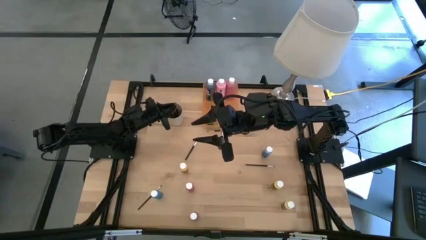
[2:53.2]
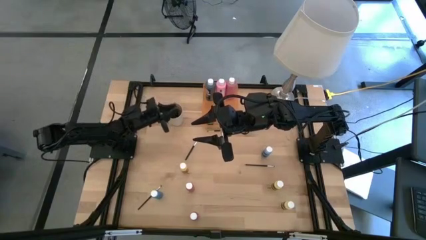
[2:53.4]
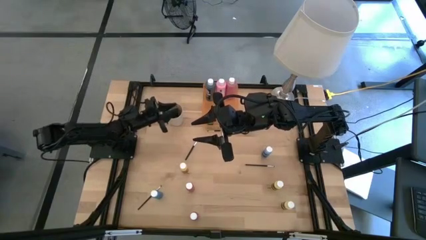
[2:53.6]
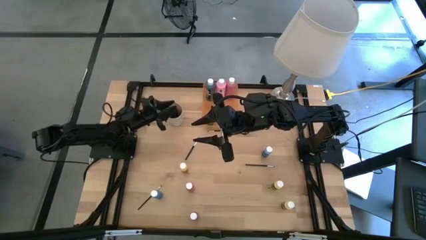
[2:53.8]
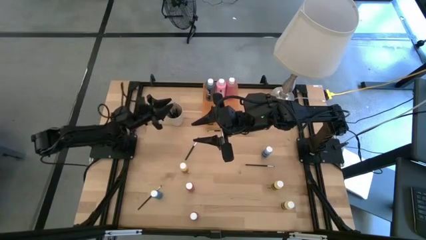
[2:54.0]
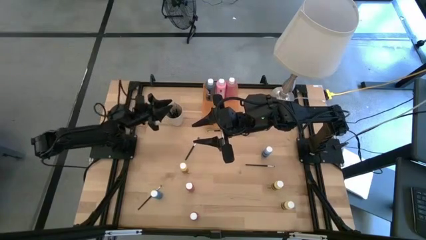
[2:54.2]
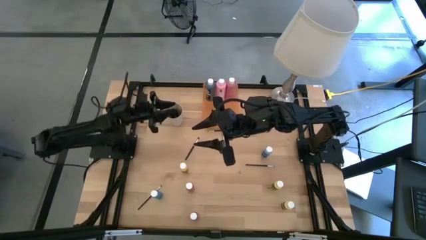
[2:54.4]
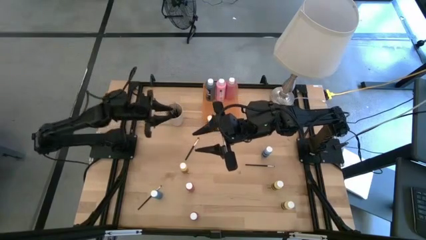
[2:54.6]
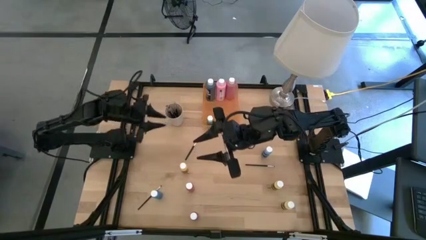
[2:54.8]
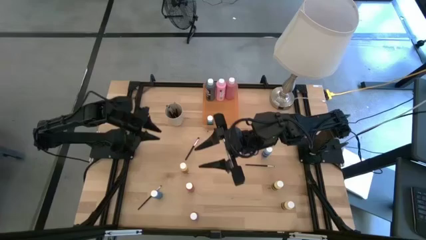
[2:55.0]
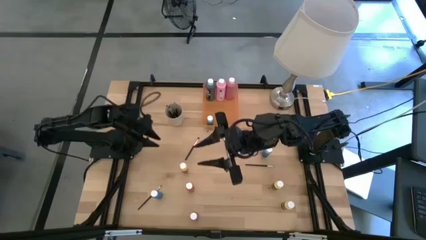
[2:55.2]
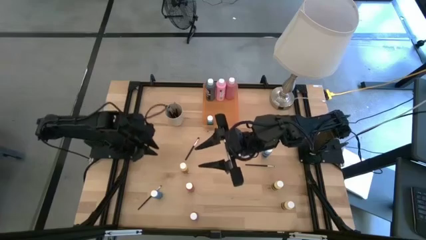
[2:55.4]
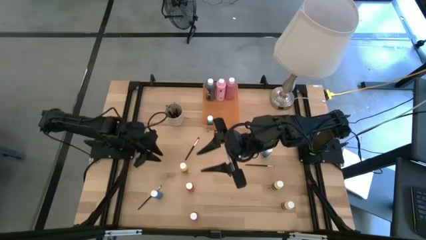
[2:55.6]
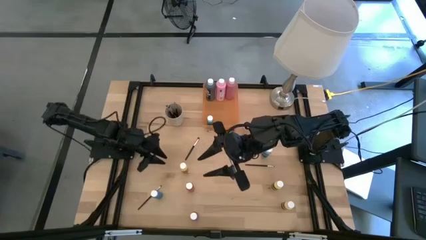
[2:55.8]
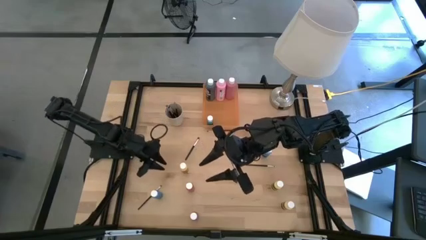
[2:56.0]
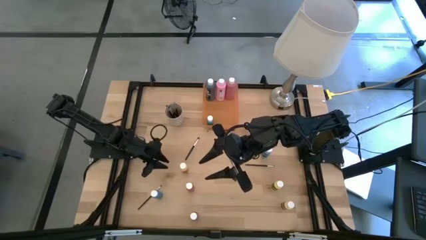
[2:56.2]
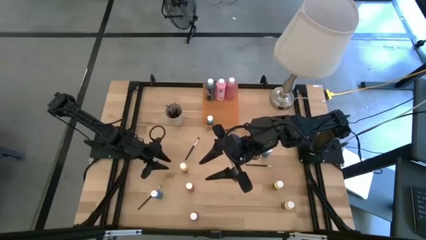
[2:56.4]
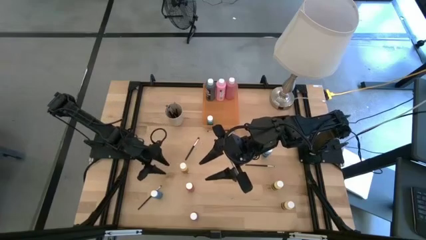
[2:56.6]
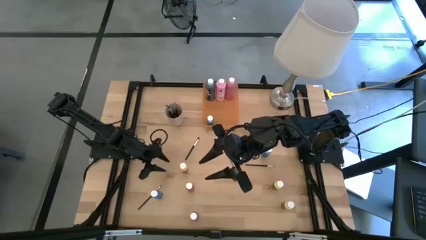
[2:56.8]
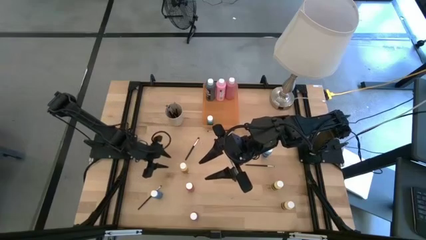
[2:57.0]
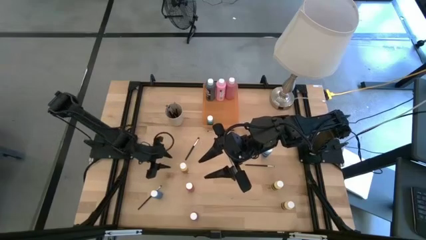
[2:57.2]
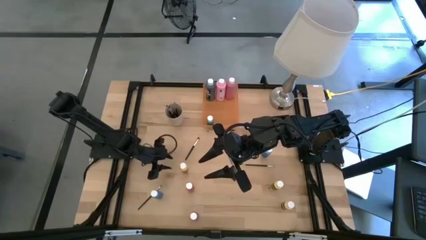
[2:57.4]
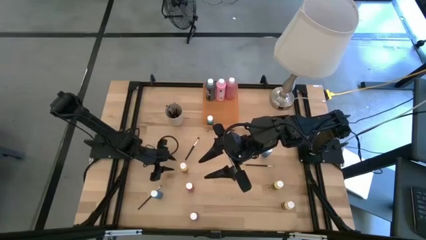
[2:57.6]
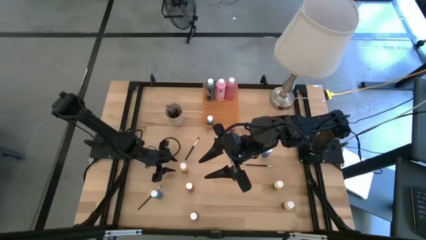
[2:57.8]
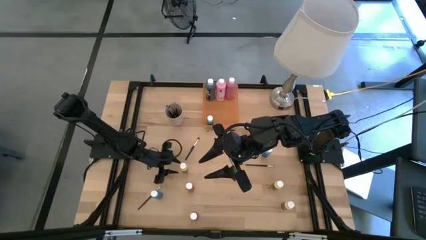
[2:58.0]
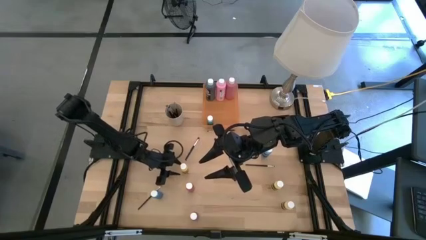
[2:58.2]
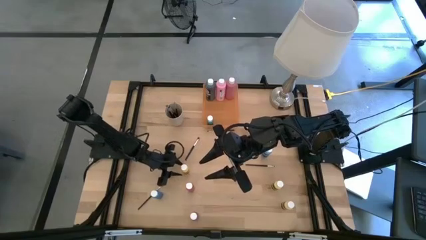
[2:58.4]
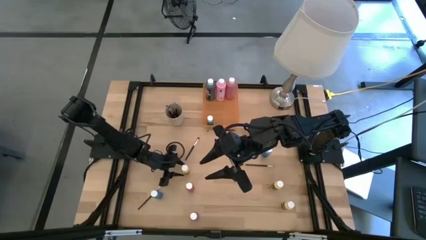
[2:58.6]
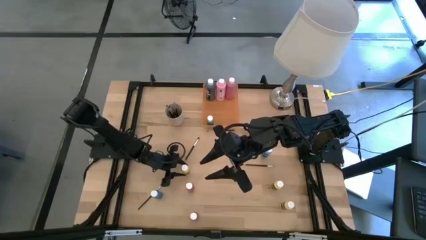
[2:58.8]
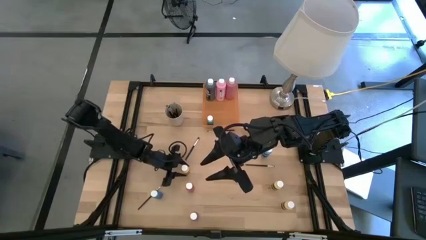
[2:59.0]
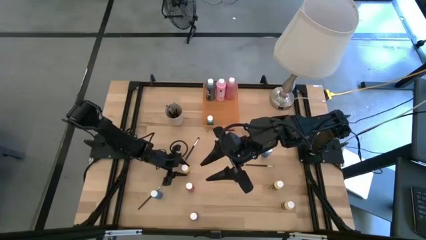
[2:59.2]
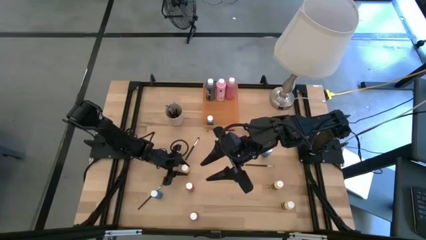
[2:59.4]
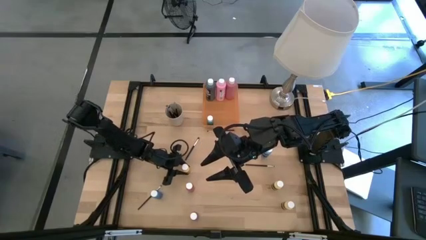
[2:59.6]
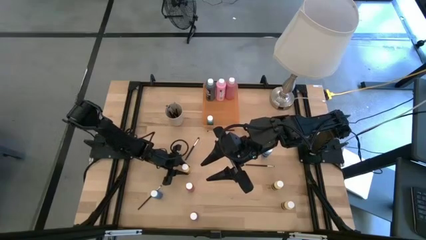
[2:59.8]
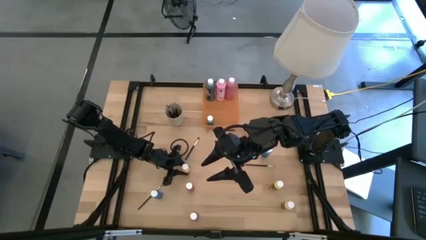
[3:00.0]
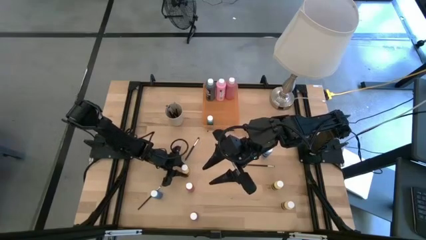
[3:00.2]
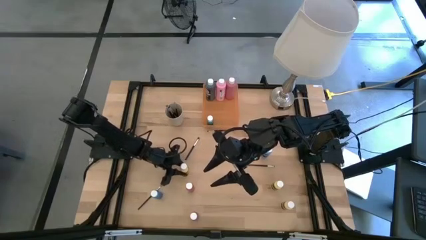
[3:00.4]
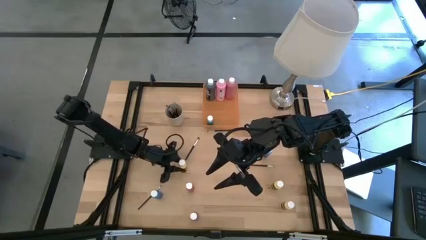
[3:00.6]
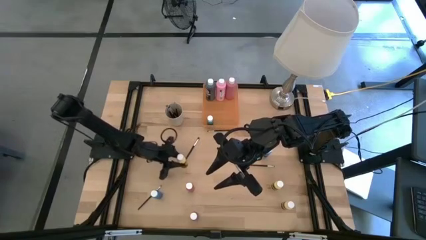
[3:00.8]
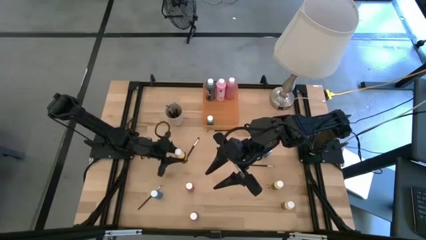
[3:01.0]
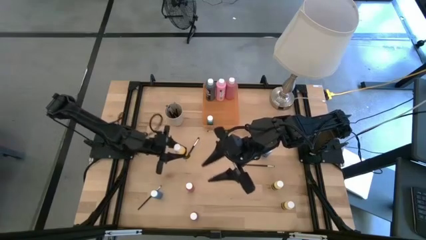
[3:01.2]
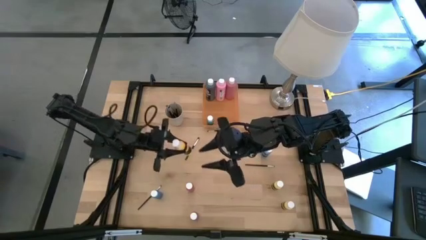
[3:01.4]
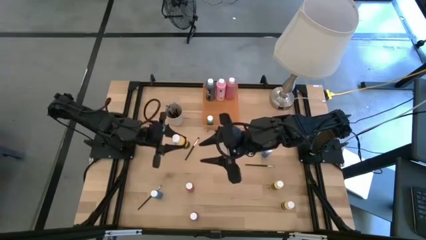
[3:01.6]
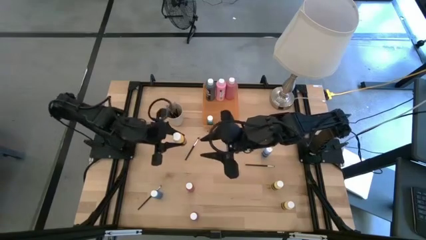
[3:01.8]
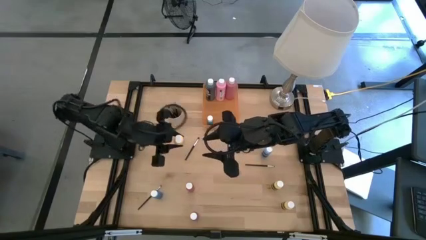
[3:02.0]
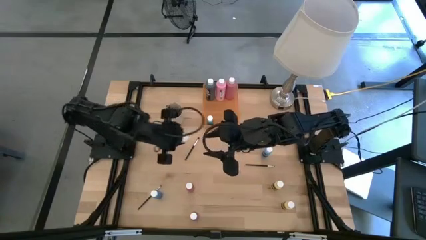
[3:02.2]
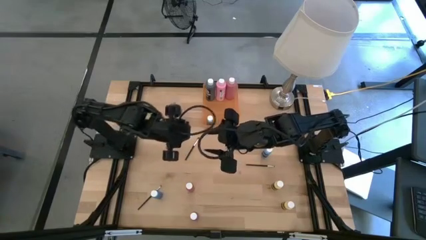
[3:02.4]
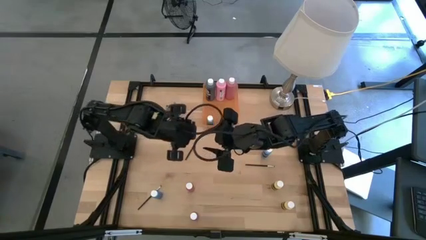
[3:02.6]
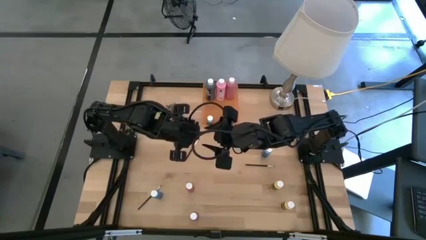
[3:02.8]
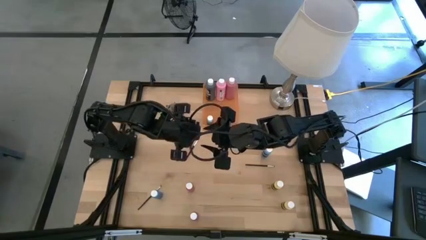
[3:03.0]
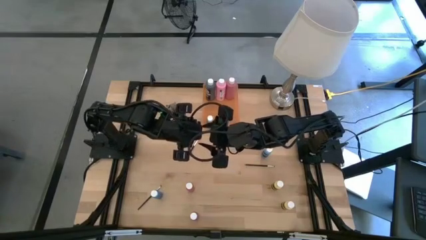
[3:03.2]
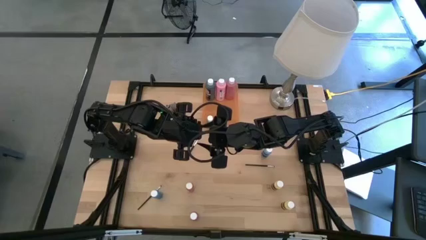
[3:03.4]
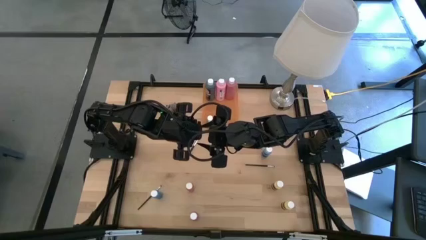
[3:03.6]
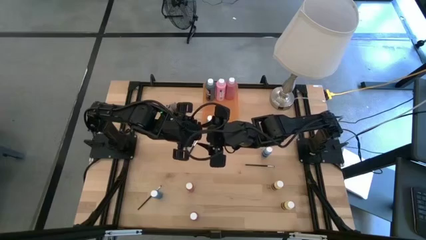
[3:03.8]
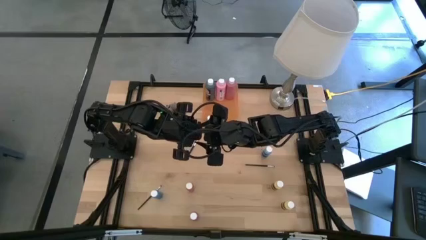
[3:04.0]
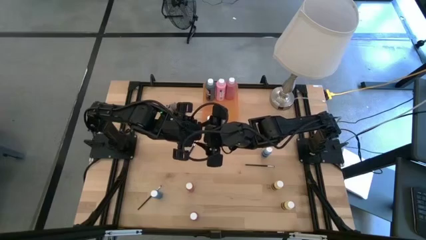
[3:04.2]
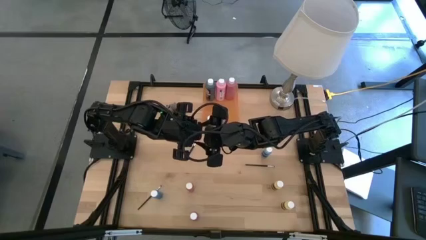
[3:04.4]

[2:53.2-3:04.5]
Task: Pick & Place Paint Supplies
Put the yellow paint bottle into the orange bin

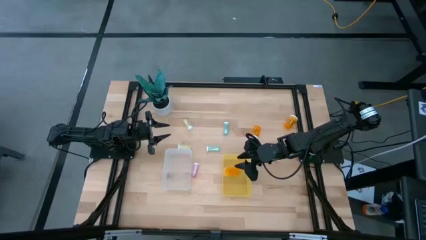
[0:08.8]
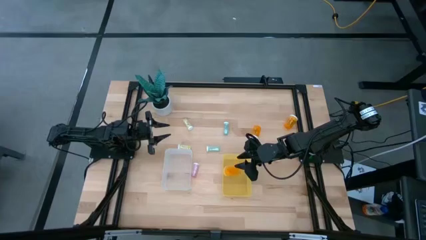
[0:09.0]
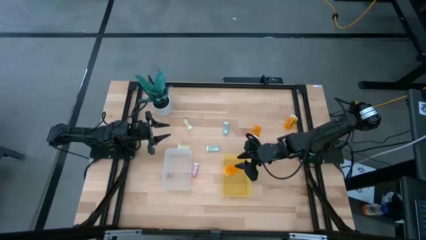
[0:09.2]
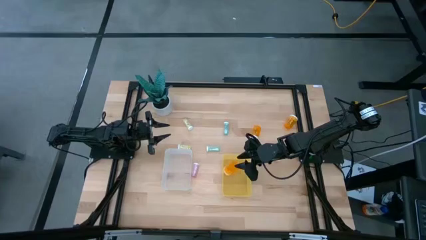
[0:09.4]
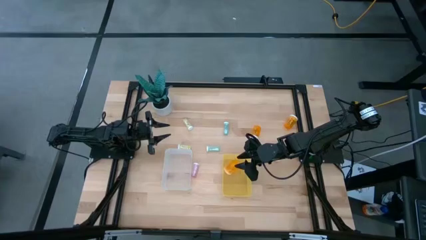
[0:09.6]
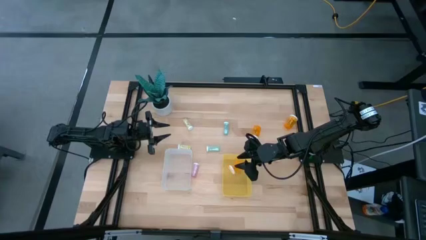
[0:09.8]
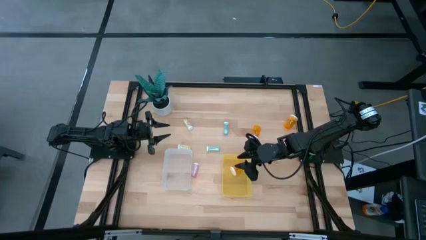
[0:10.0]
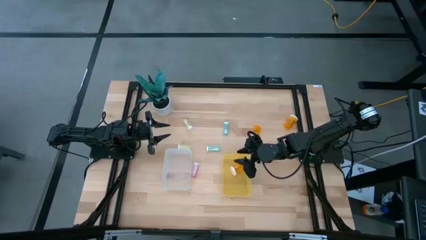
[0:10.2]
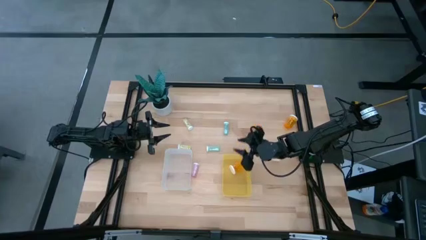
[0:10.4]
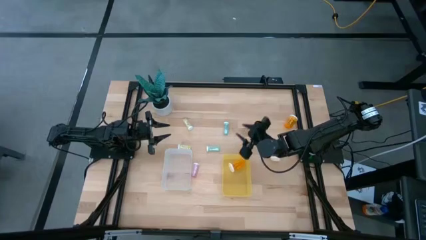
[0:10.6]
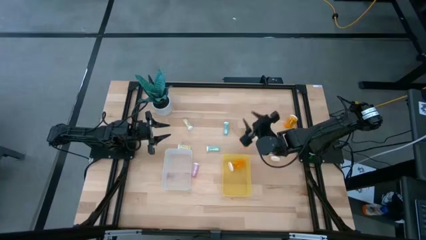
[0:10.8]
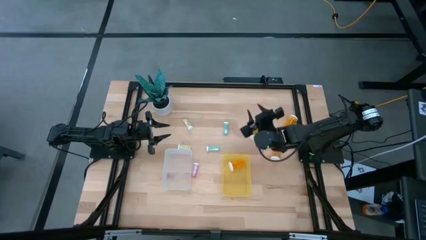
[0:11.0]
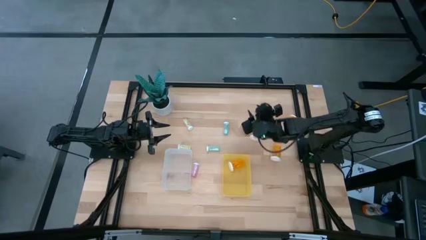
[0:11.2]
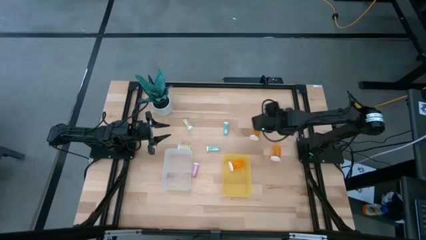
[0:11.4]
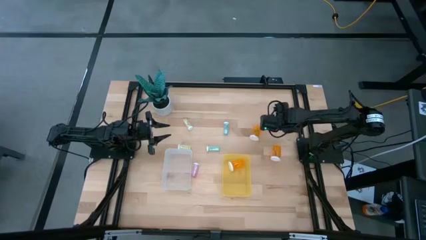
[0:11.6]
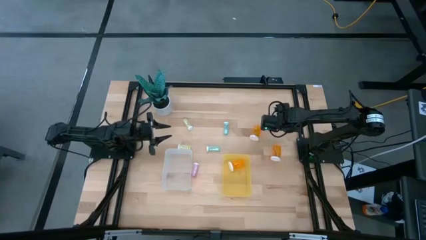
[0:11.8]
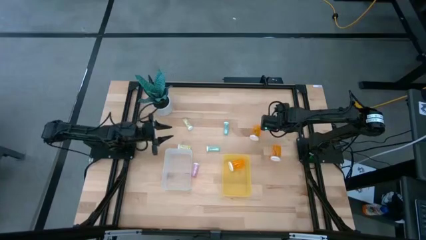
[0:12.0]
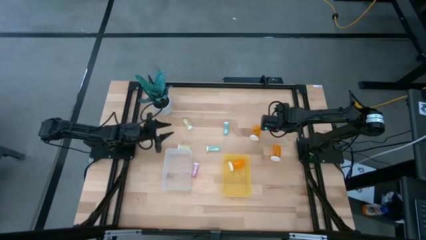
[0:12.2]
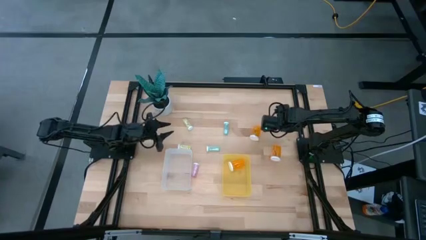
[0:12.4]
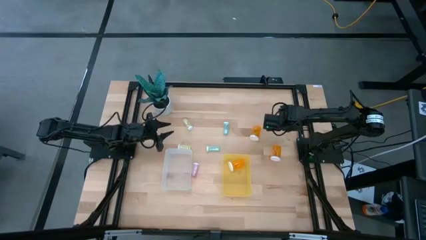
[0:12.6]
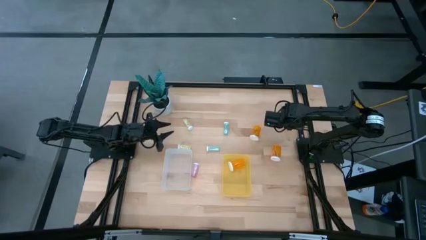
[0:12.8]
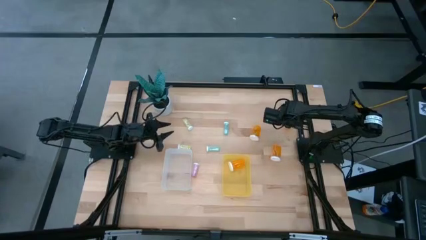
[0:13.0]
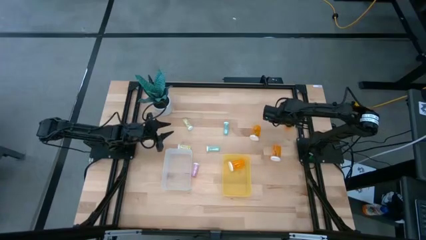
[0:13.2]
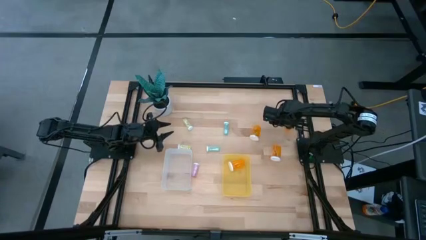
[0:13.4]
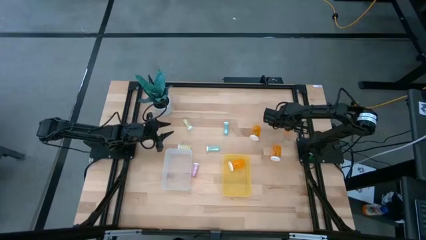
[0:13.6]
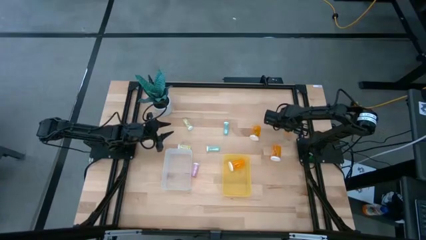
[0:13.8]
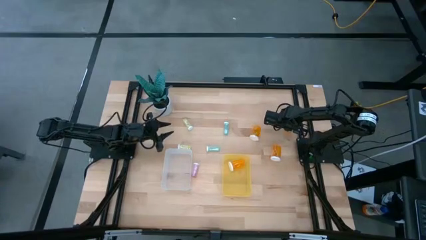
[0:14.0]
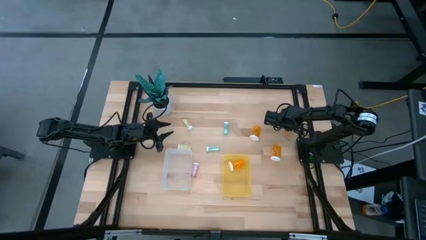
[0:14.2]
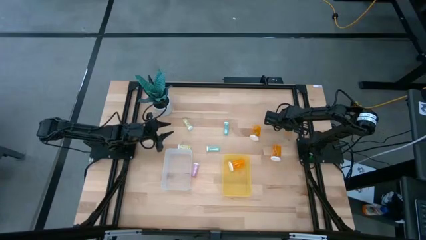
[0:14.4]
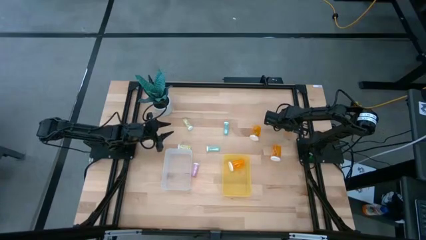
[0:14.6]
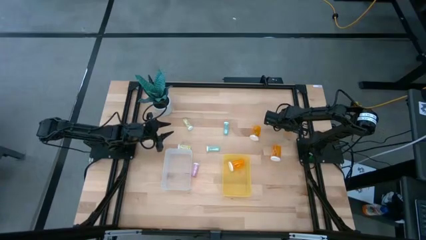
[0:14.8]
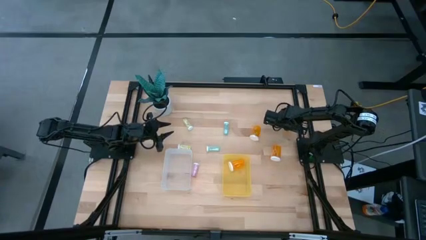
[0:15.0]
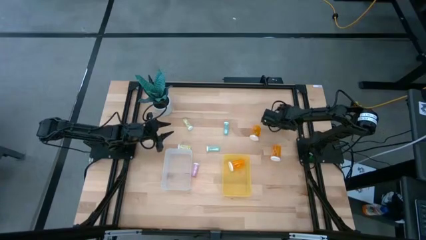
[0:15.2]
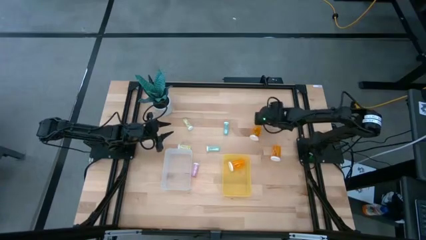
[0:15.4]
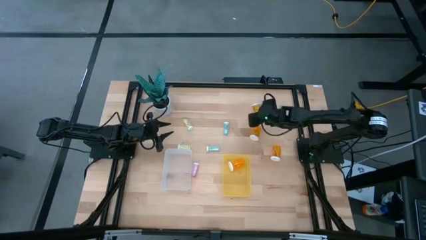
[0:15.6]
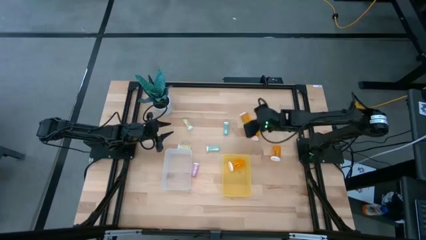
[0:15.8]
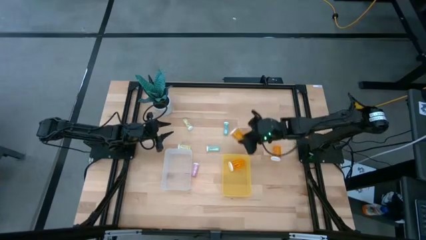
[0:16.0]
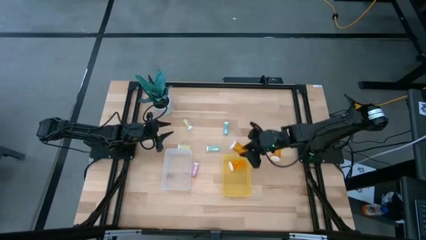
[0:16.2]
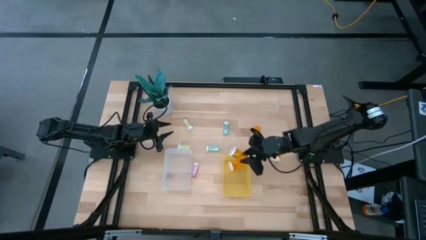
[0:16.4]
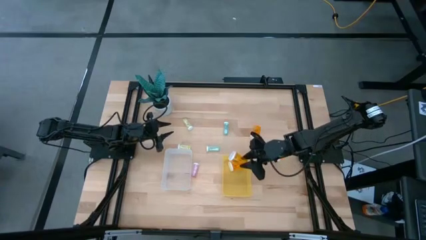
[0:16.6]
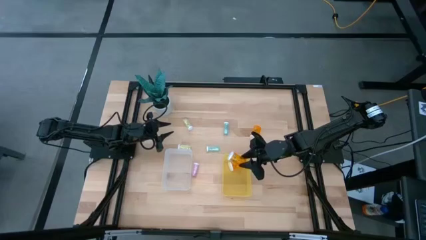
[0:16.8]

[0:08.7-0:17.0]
Task: Pick and place medicine bottles into bin by pill shape (circle, oval)
Put the top right orange pill bottle into the yellow bin
